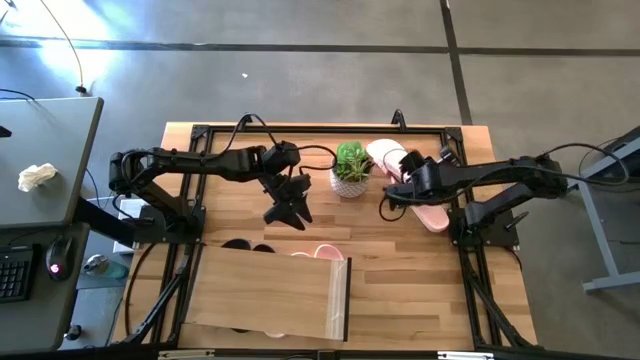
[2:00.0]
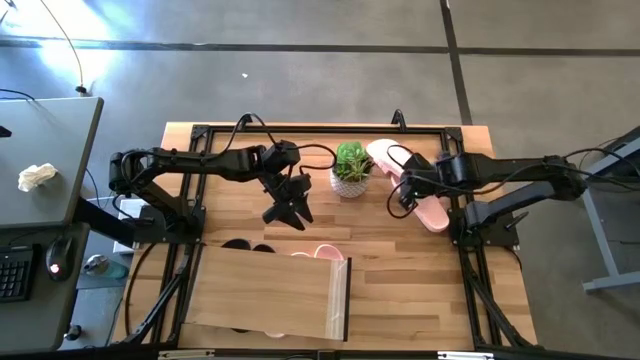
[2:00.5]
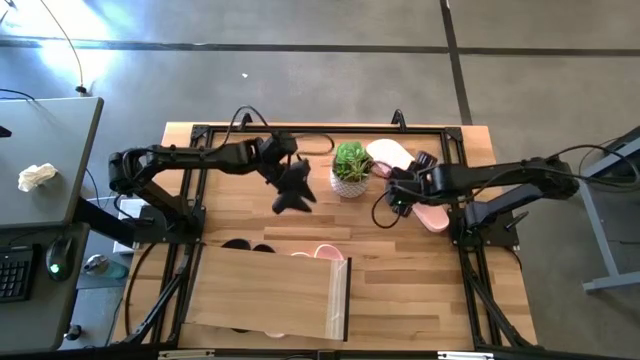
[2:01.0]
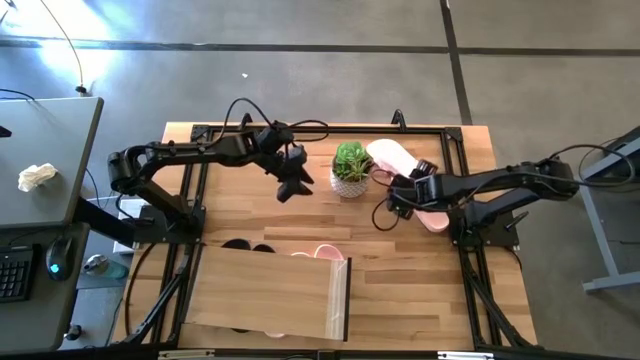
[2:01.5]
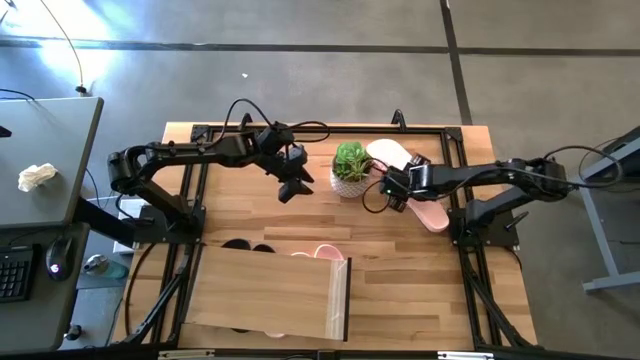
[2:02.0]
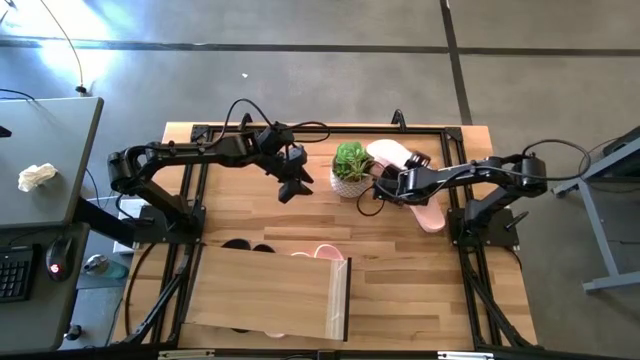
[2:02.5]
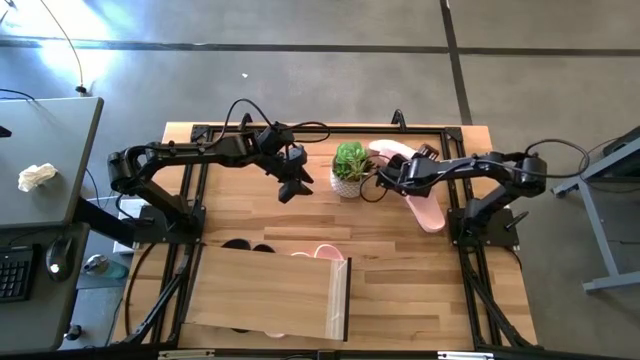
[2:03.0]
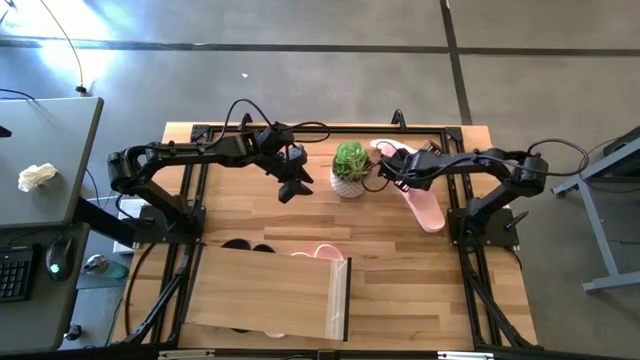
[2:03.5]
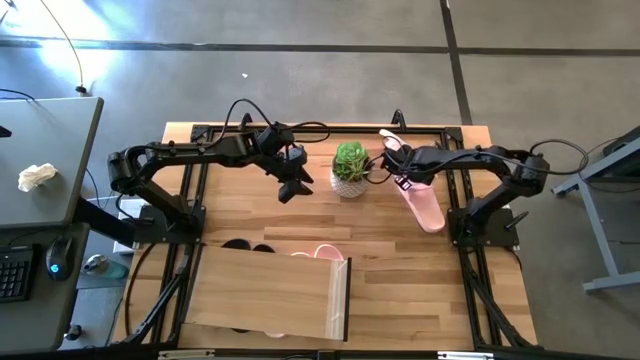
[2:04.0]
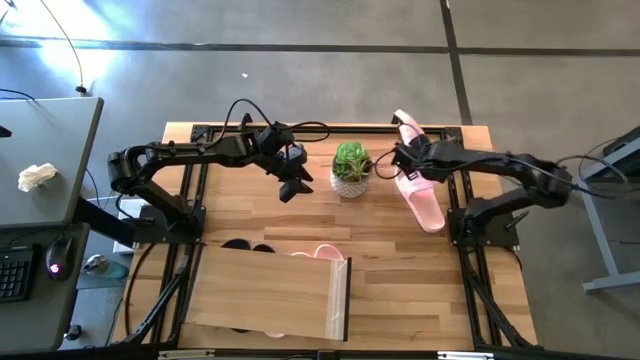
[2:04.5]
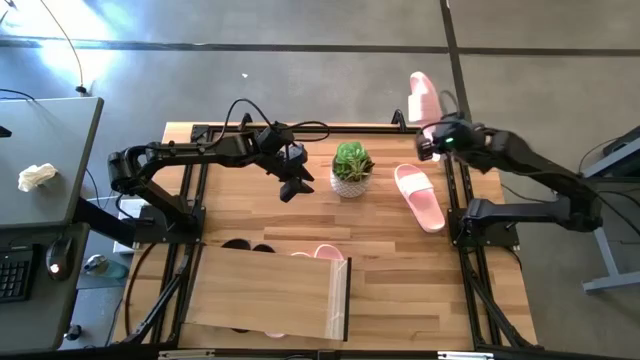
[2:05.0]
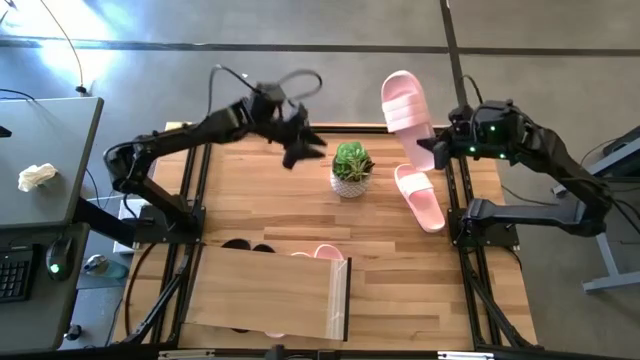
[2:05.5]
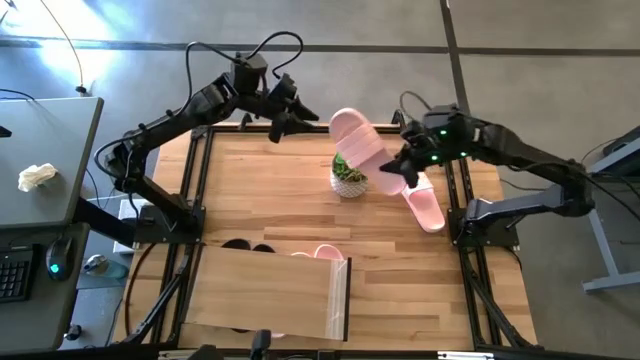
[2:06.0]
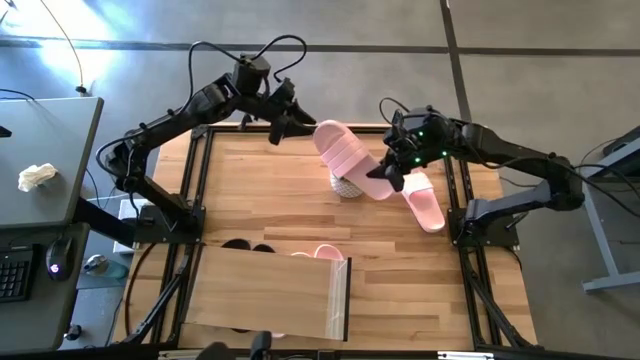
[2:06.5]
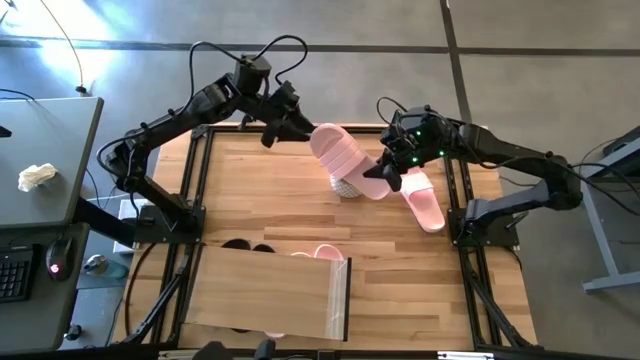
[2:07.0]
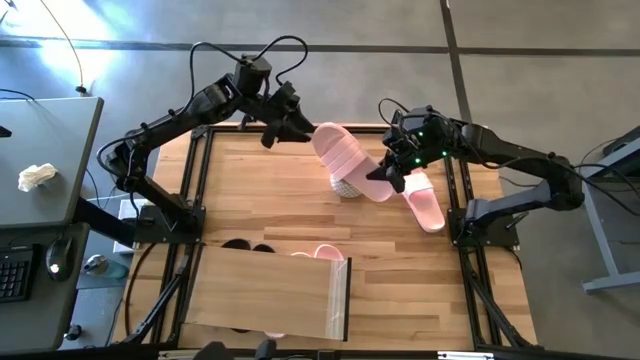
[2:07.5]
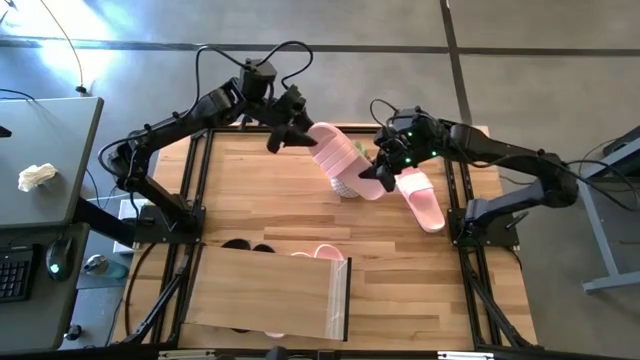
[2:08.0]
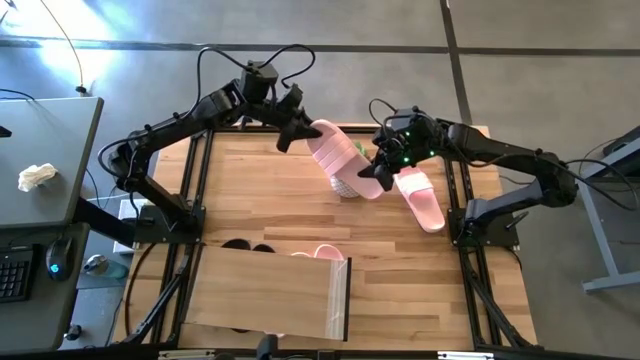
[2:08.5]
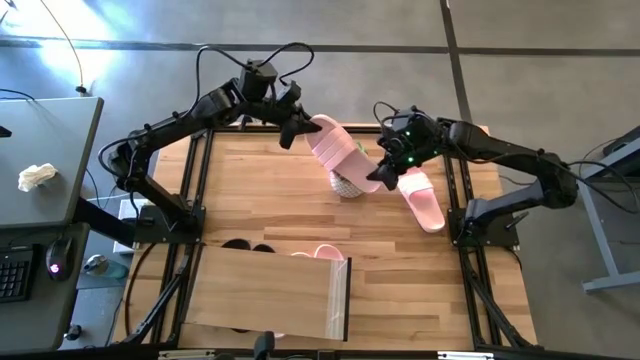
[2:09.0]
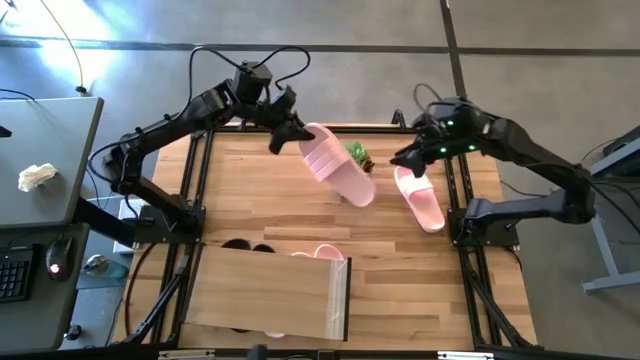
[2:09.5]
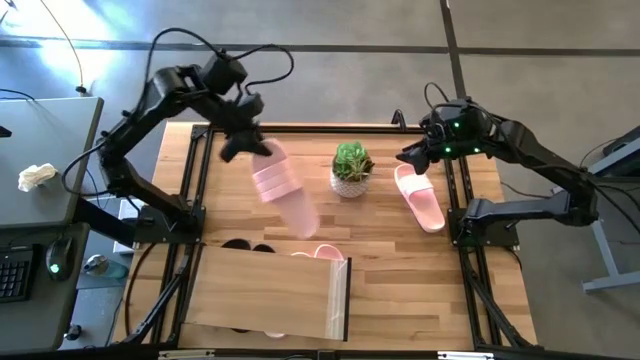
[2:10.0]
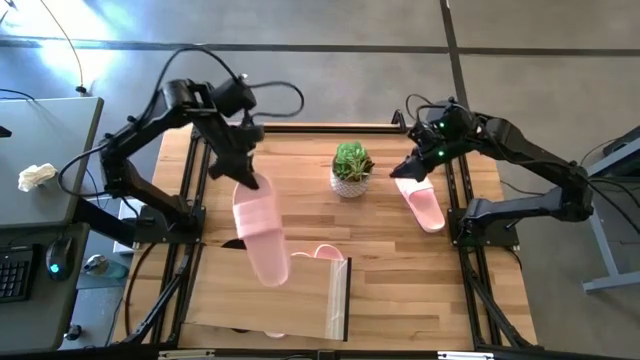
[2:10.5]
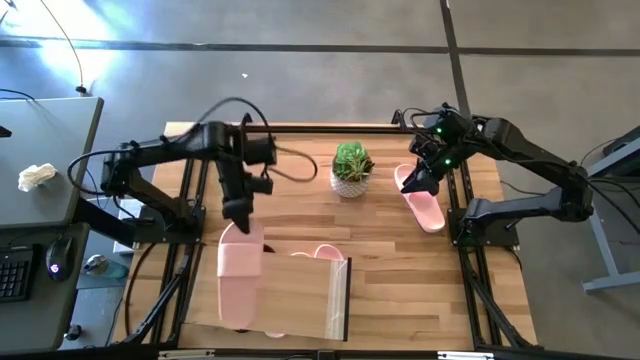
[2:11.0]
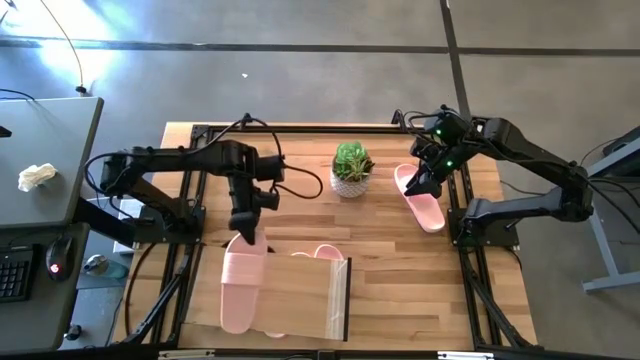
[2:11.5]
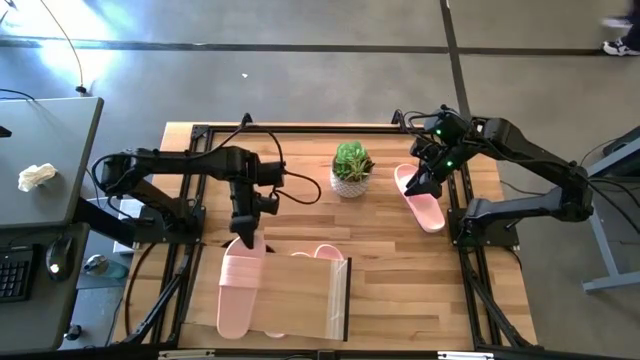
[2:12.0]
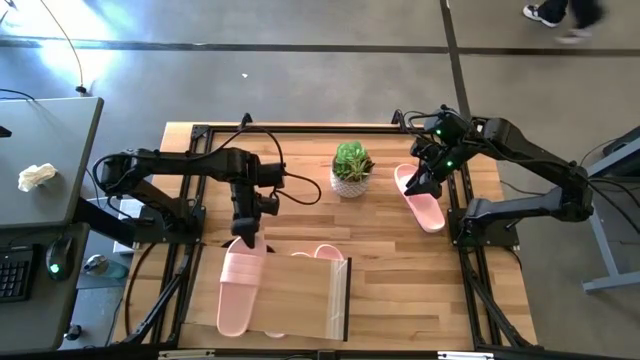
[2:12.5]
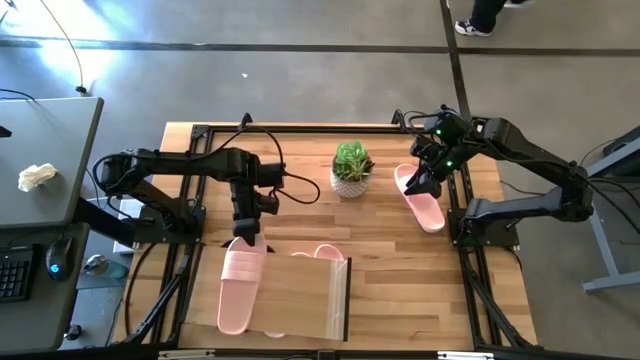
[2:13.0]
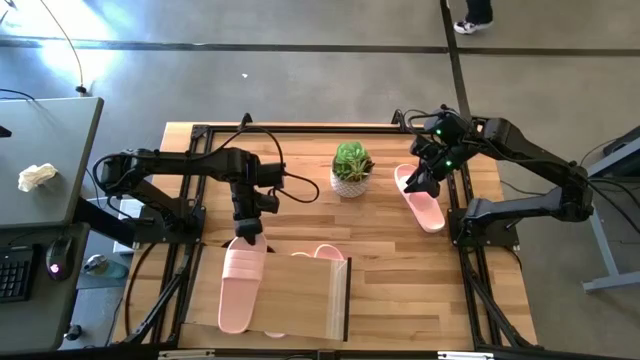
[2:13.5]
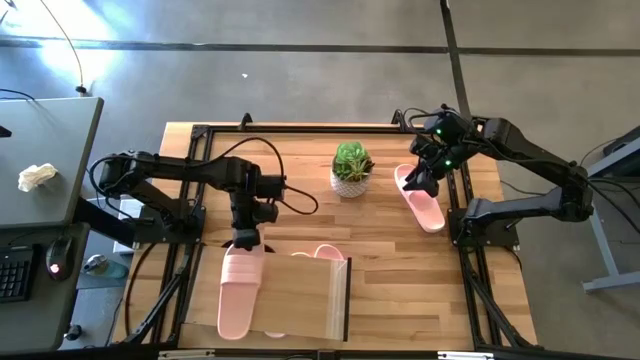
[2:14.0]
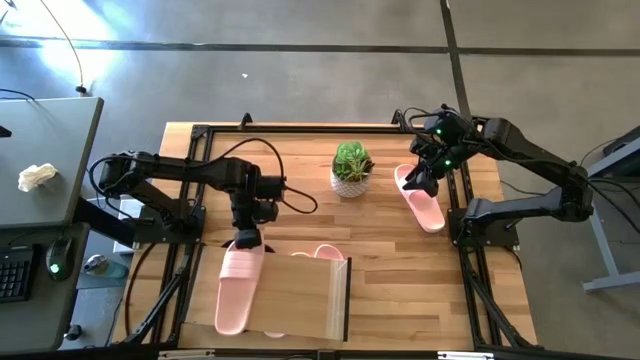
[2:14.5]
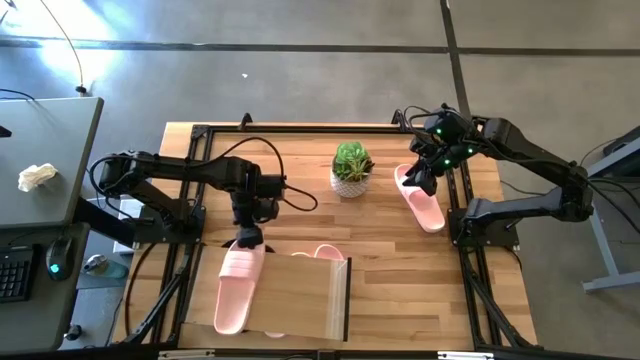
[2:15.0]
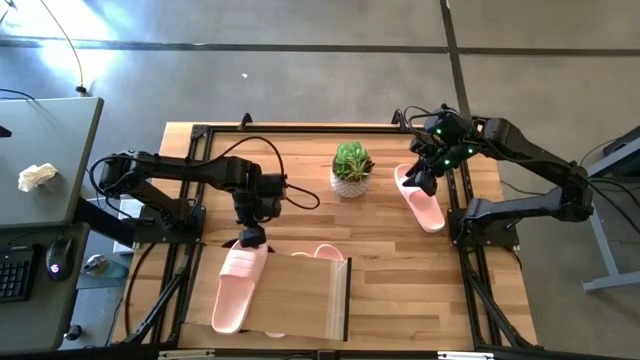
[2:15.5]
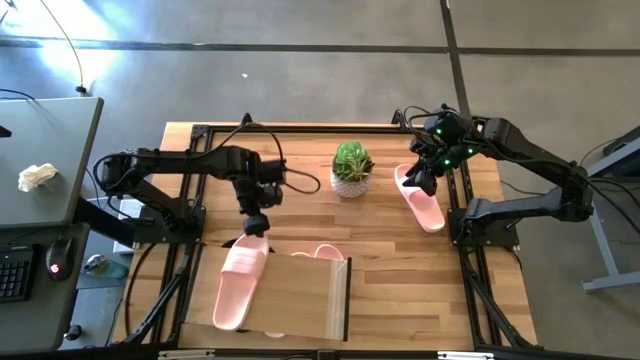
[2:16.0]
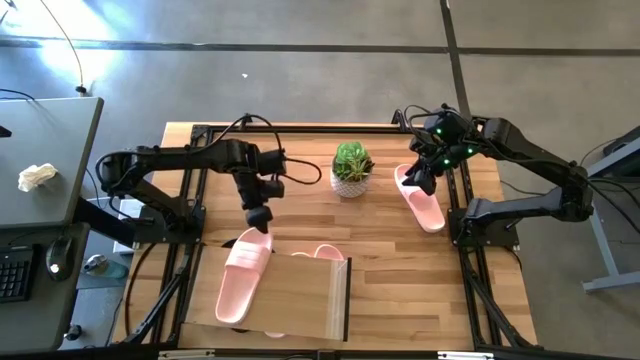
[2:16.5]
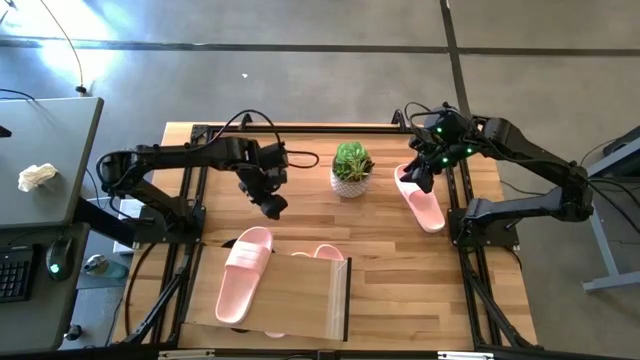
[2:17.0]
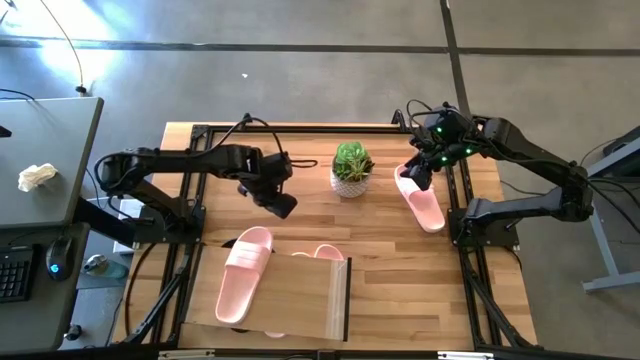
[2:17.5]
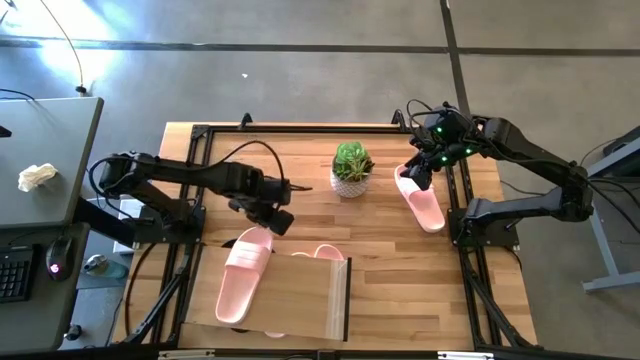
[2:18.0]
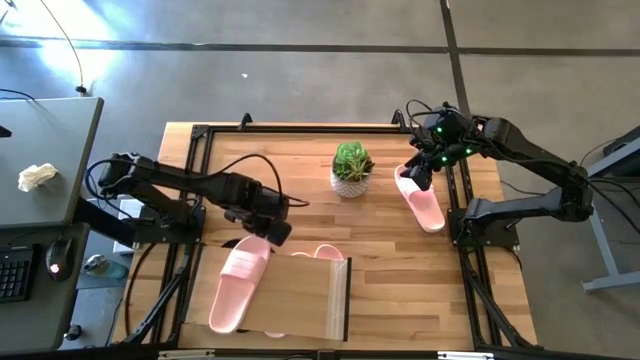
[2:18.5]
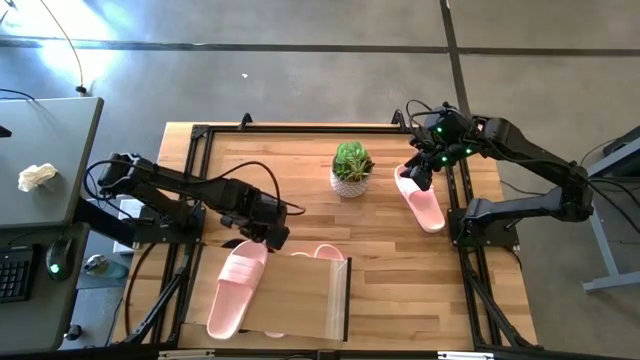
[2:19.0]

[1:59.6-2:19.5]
Task: Pick and place slides into the shelf
Put the pink slide on the shelf

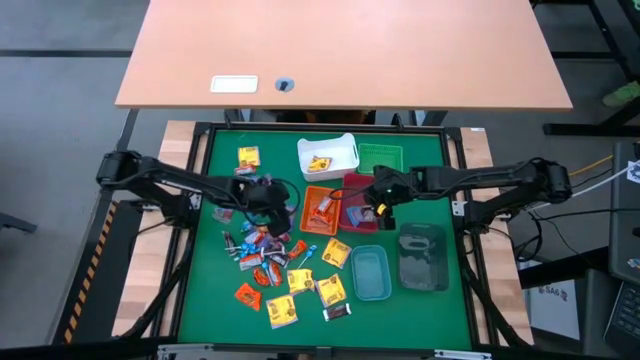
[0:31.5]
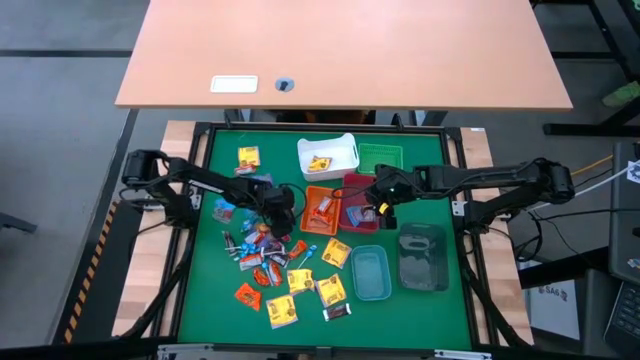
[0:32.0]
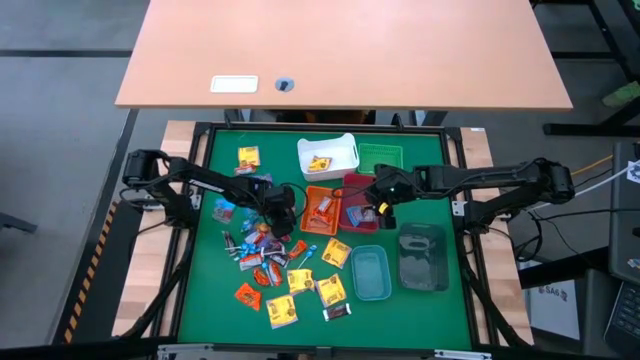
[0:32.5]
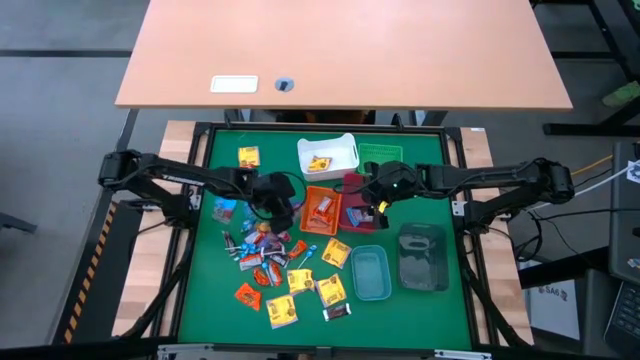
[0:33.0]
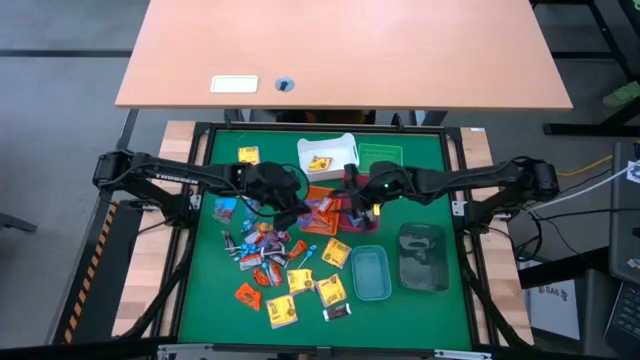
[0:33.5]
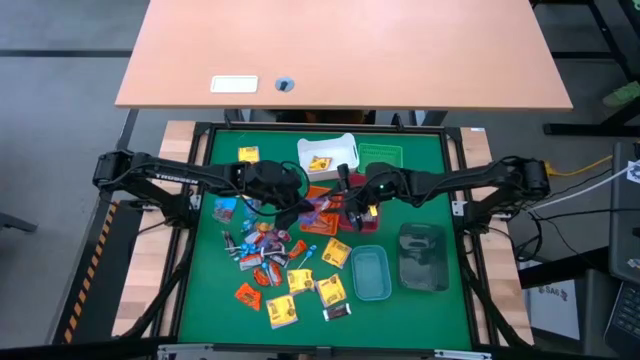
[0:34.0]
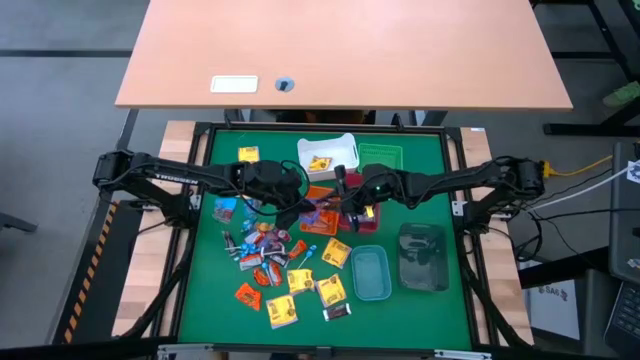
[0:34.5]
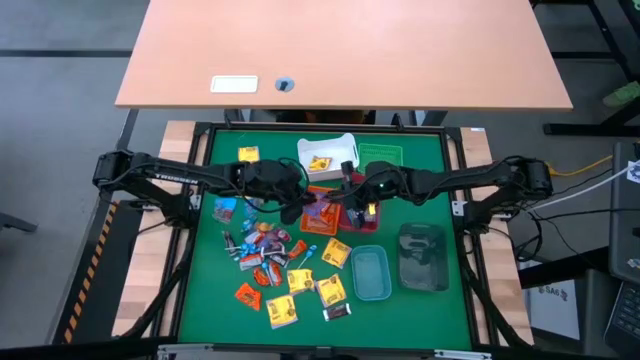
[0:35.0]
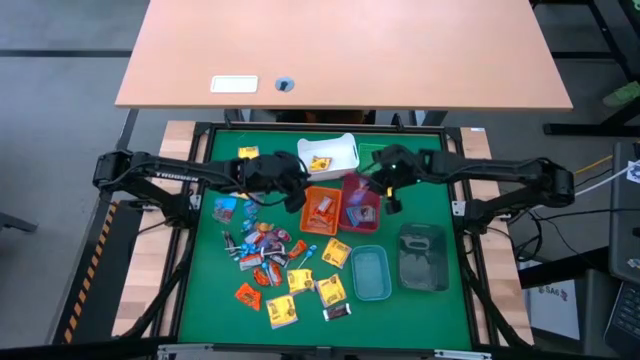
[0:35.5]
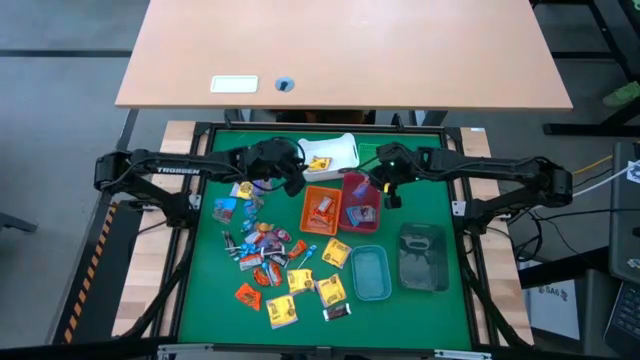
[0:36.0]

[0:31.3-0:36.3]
Task: Sort candy
Put the purple bag of candy into the red bin
